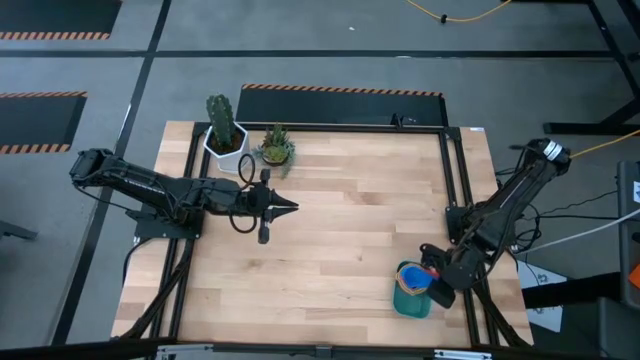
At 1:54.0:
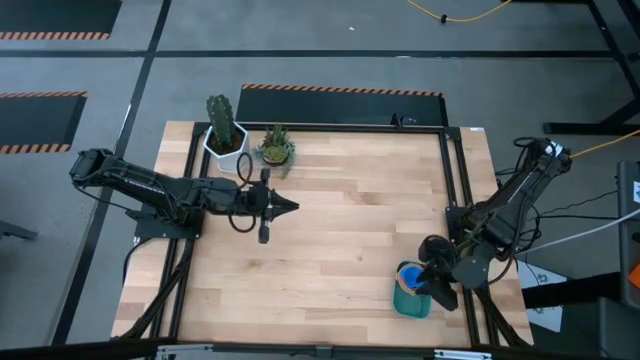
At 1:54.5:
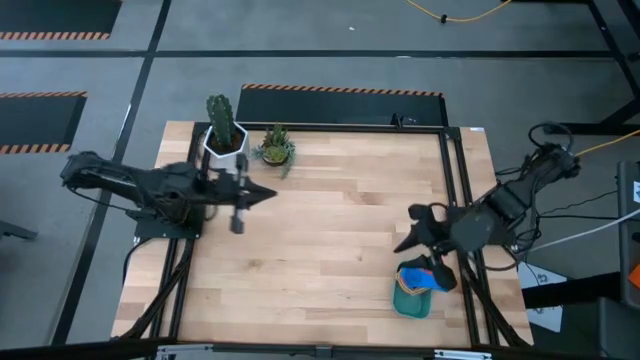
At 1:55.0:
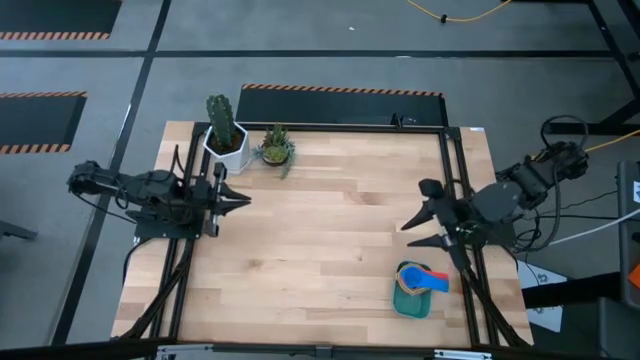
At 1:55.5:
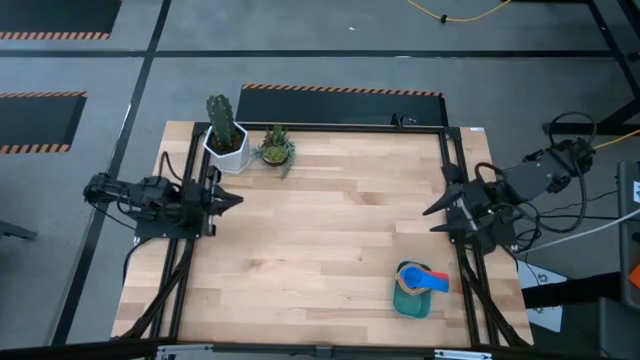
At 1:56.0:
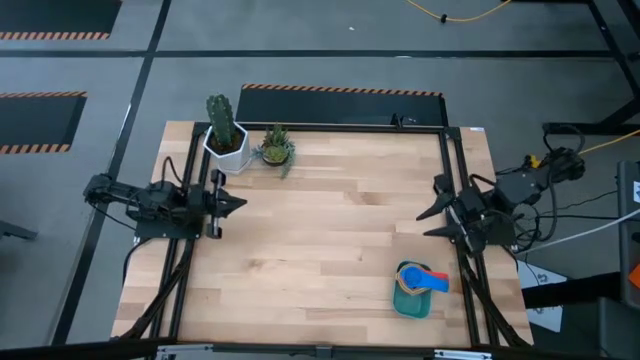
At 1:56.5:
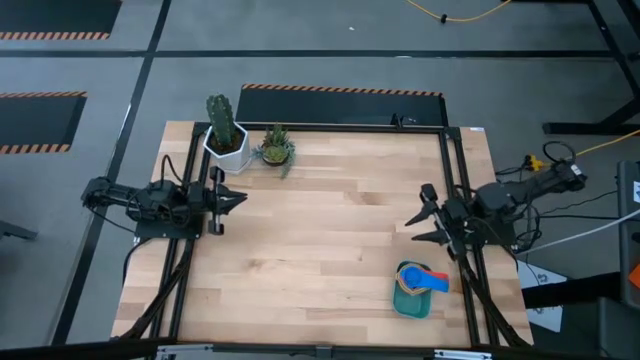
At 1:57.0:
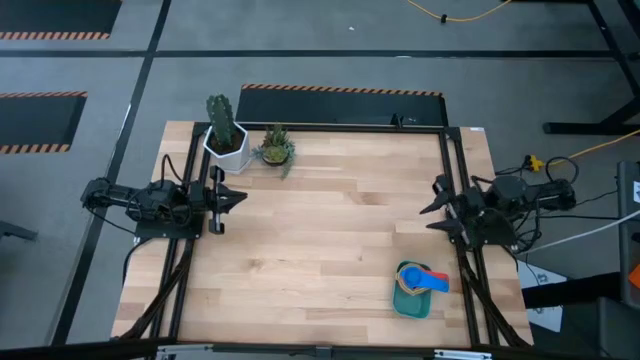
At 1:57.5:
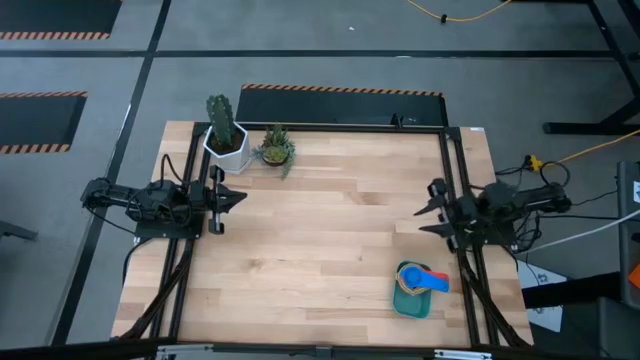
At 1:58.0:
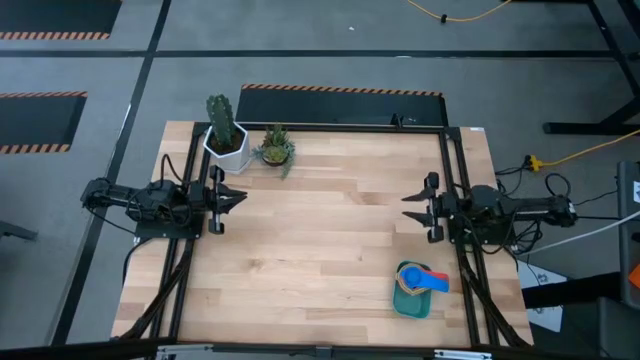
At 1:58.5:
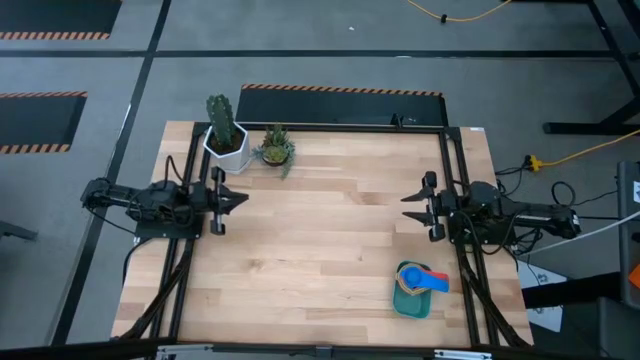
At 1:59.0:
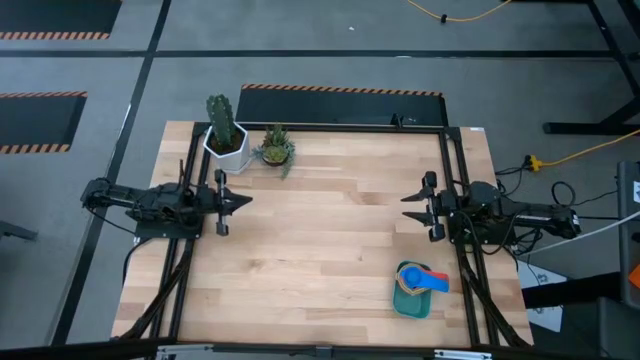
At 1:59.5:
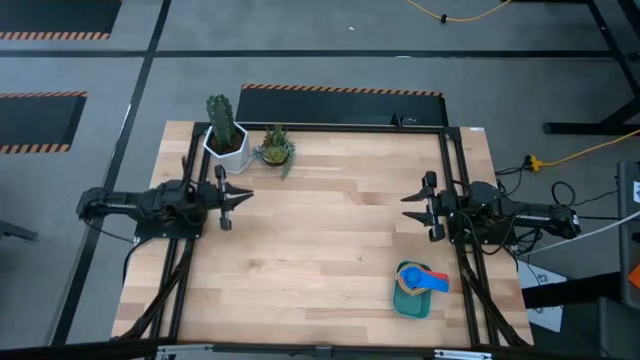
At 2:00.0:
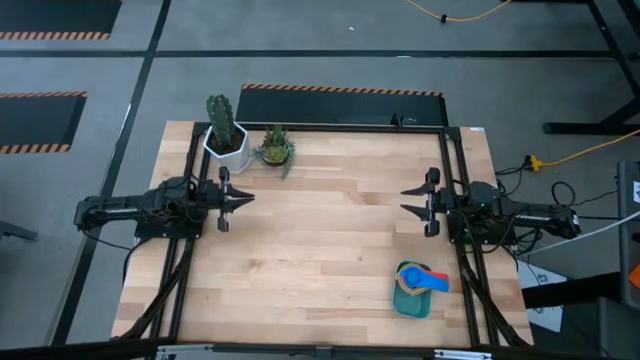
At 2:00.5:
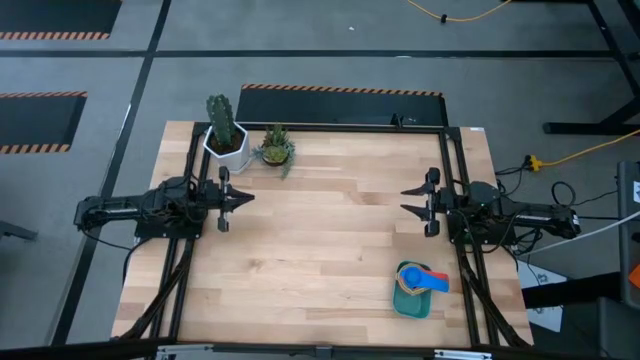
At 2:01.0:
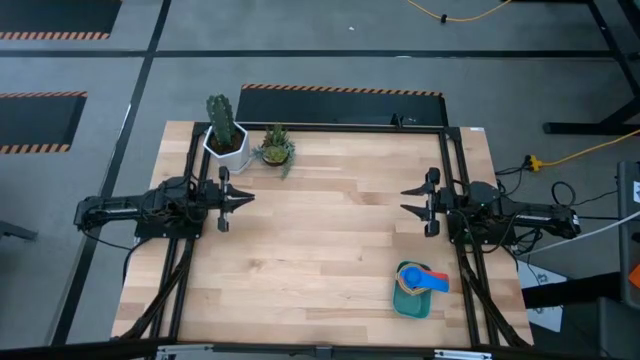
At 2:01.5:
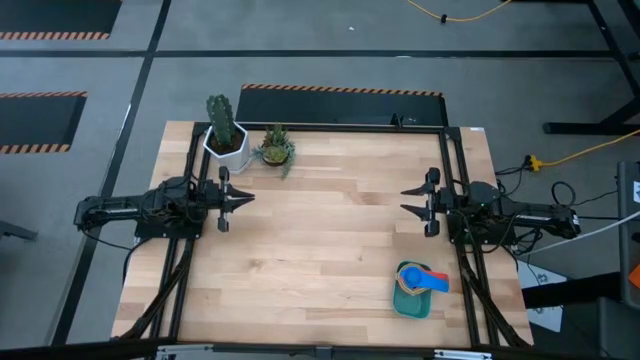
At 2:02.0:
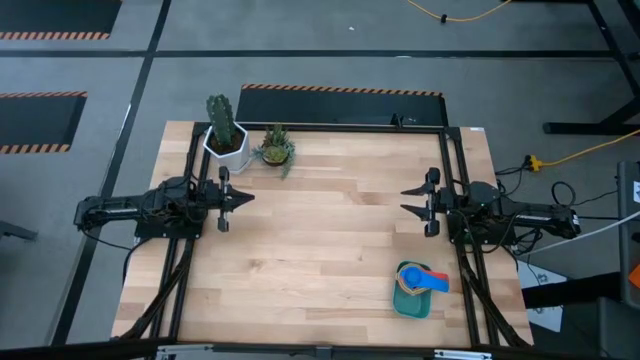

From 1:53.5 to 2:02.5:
Task: Nest measuring cups in basket
Return to Home Position
